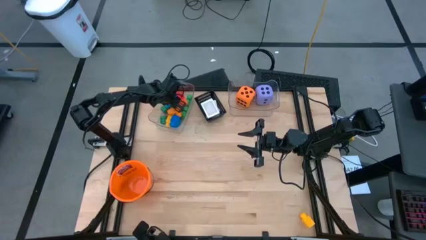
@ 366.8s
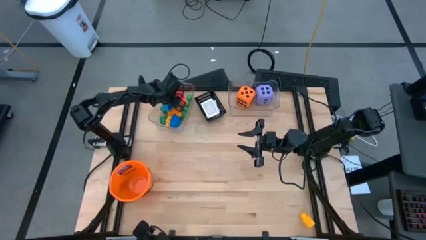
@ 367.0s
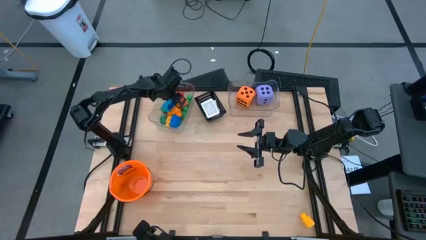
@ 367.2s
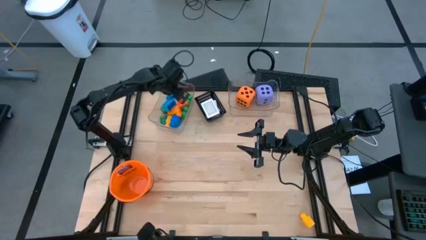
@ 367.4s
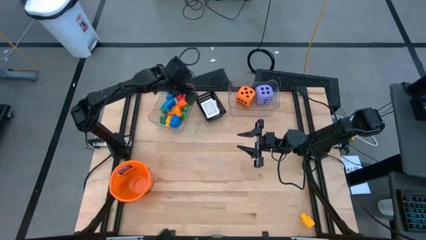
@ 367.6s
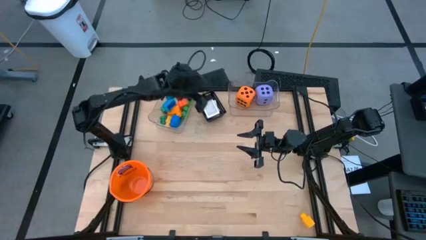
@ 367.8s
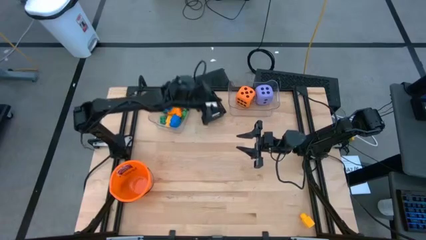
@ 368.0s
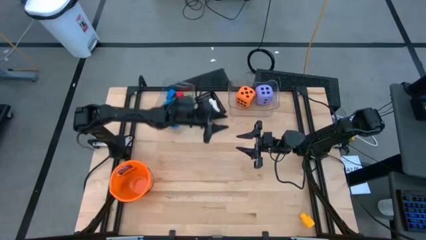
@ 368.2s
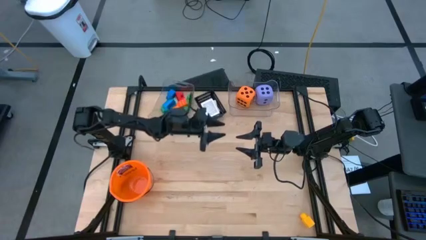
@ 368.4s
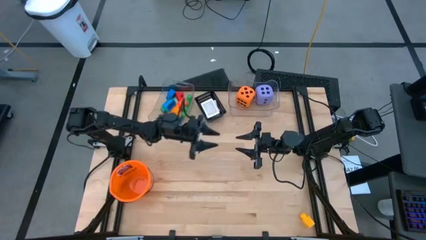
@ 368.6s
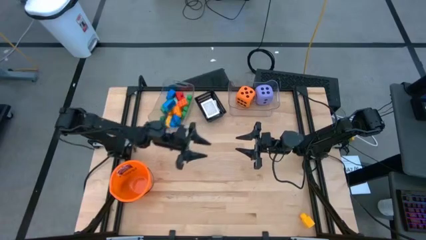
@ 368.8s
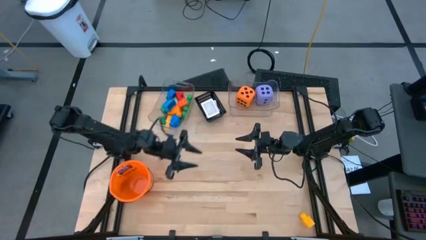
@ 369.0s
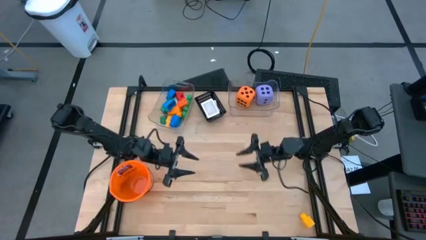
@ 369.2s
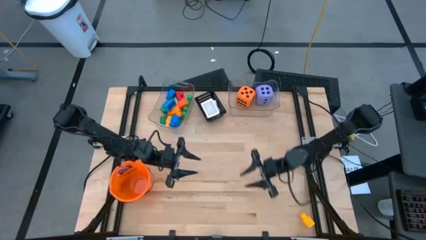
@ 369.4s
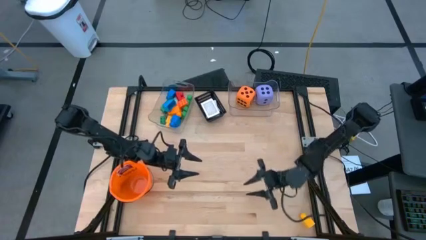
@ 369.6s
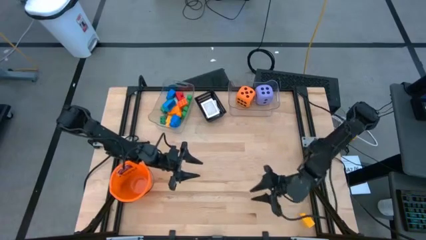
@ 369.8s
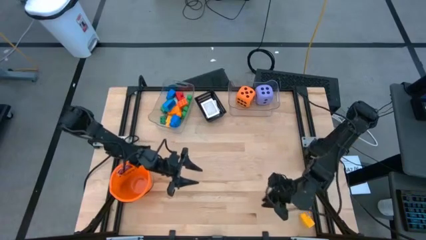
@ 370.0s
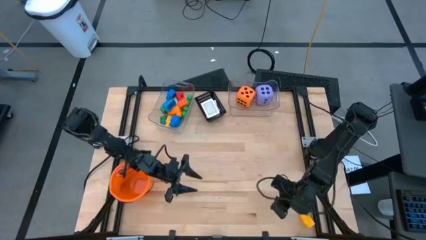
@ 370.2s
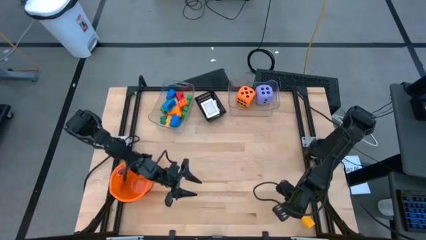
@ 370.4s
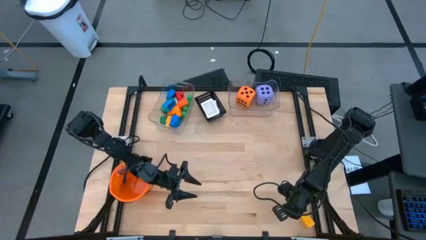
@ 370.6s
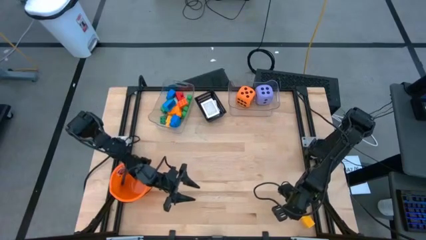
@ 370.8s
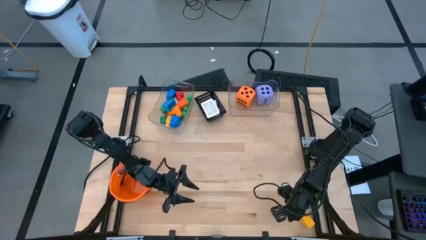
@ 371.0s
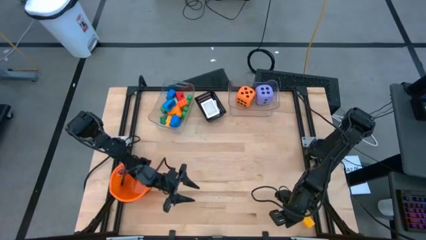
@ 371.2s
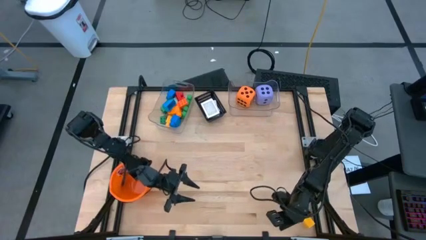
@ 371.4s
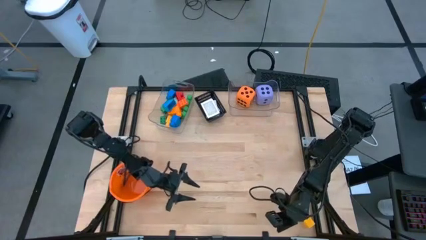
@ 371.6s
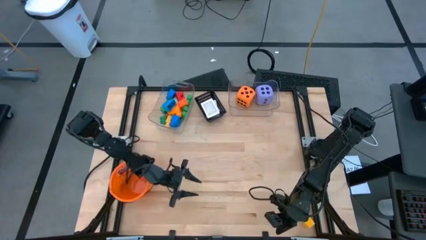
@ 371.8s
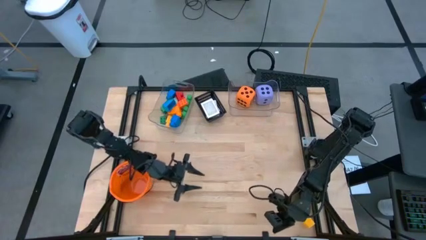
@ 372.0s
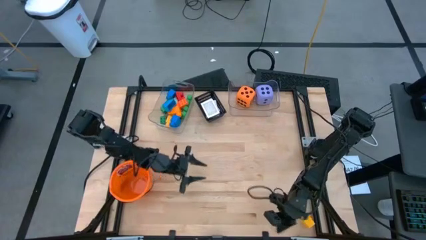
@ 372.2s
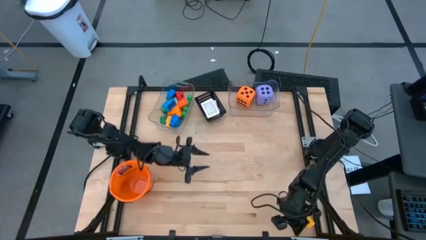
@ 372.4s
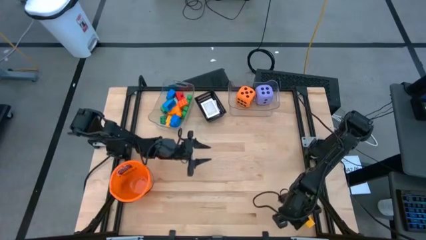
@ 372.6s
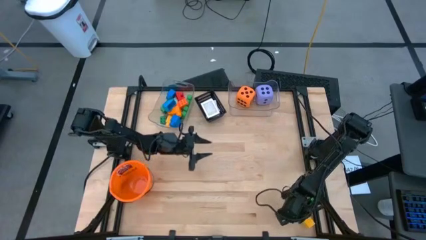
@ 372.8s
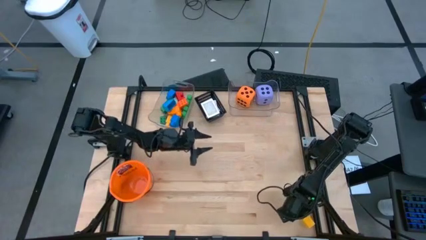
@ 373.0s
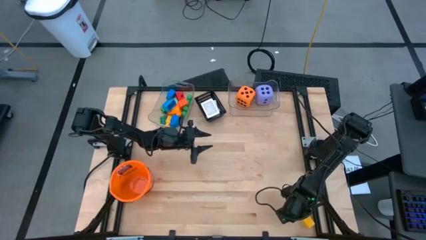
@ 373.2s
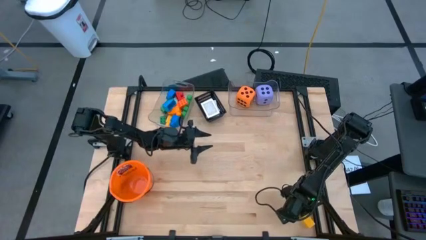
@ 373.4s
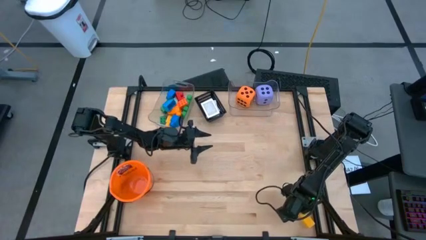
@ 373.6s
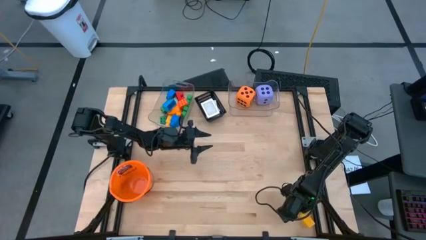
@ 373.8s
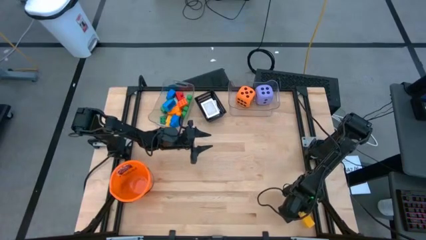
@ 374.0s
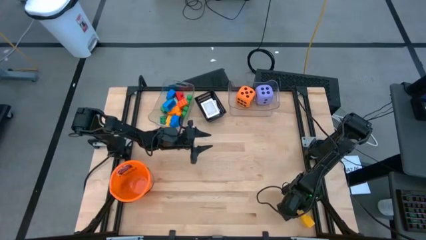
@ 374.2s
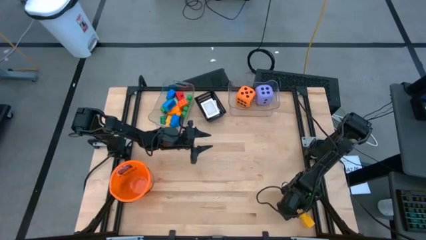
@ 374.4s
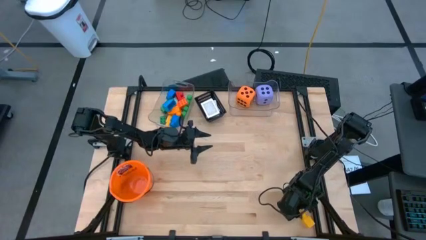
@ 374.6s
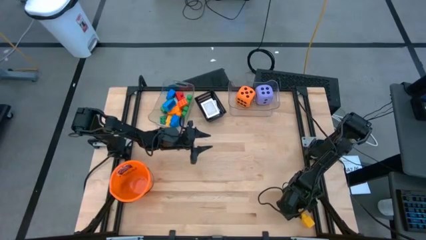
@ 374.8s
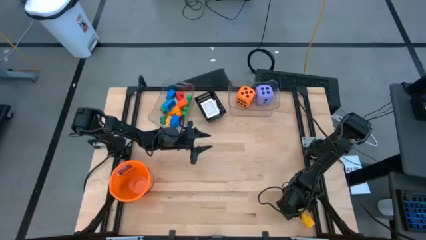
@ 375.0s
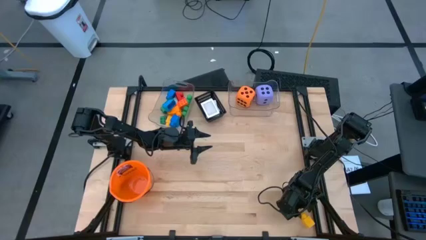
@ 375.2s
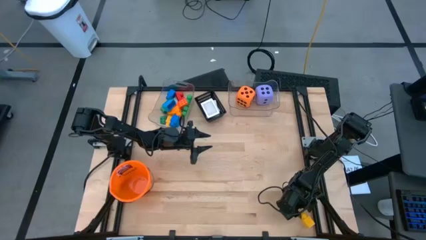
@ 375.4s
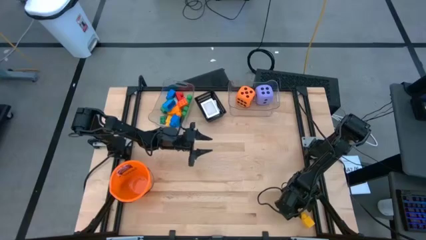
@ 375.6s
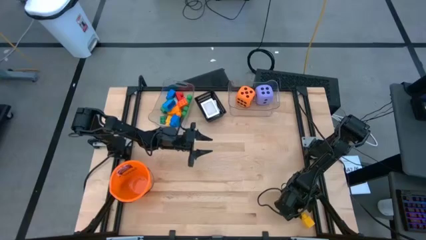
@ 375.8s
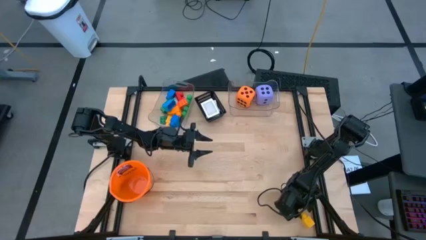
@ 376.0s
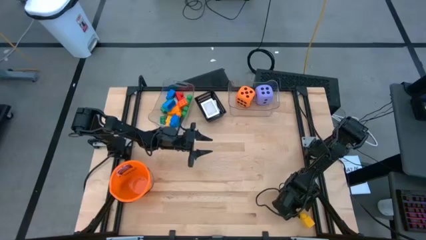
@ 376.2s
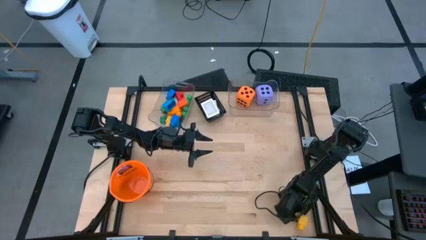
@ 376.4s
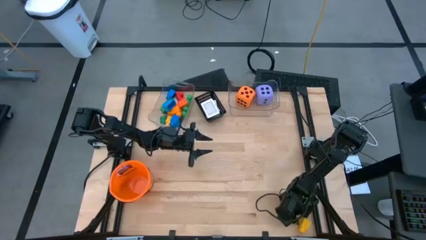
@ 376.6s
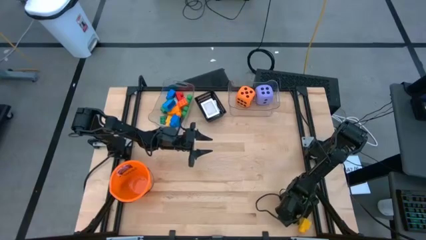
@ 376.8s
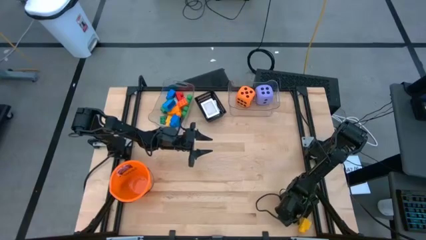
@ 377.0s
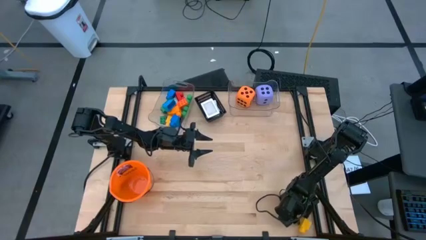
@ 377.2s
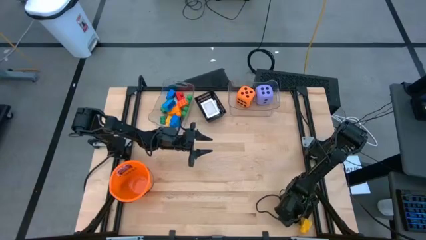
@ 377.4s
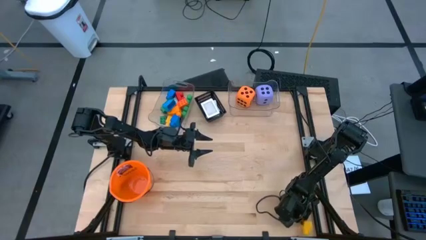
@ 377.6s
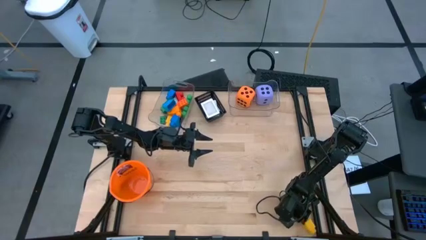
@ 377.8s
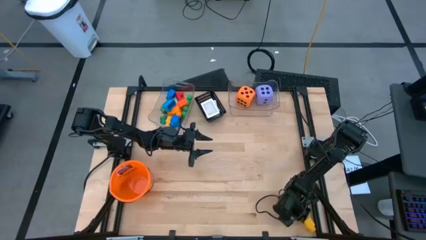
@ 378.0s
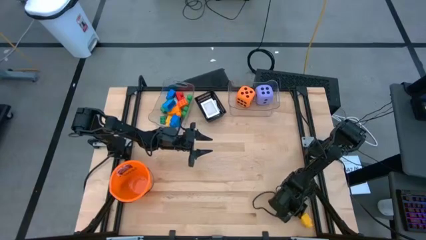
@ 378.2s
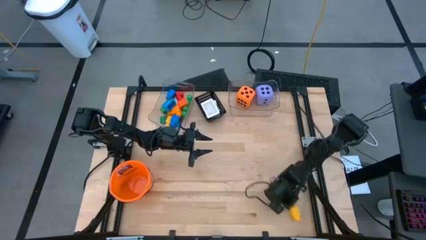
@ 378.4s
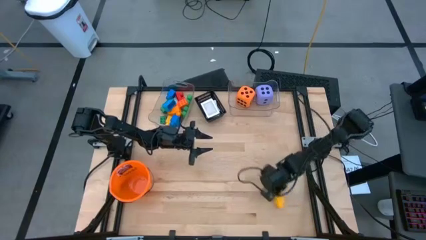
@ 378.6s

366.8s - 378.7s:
Task: Pick & Place Toys
Put the yellow gamepiece into the left transparent bin
